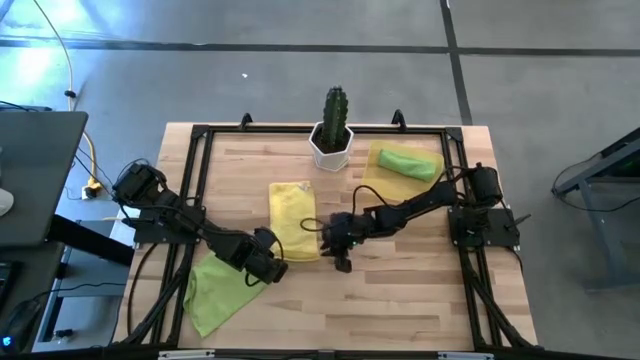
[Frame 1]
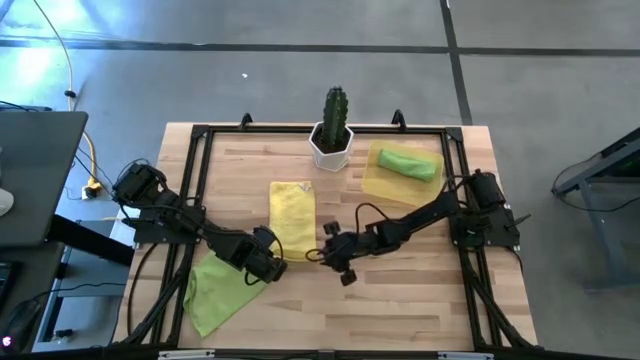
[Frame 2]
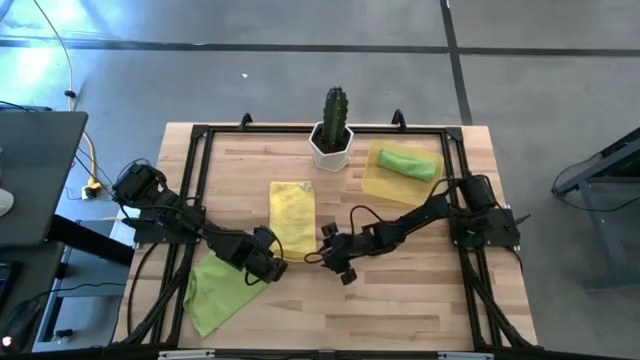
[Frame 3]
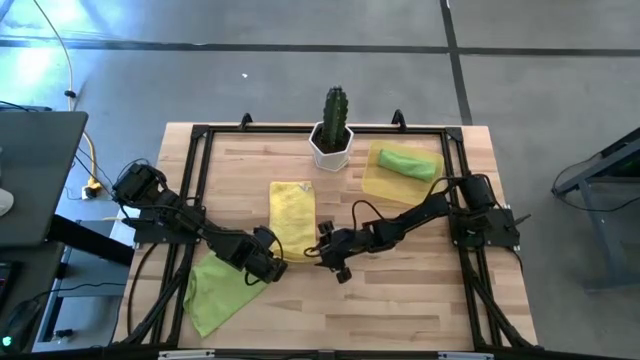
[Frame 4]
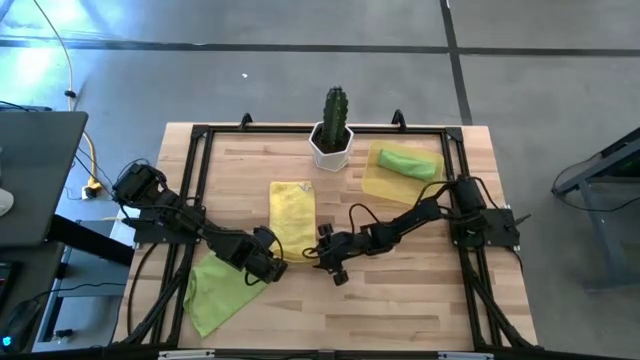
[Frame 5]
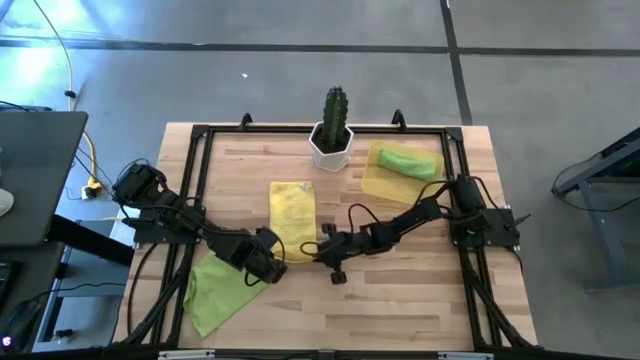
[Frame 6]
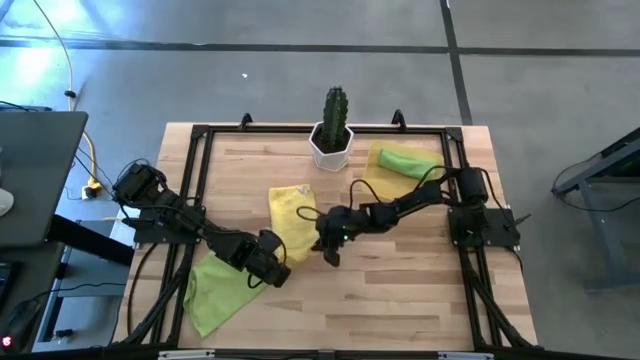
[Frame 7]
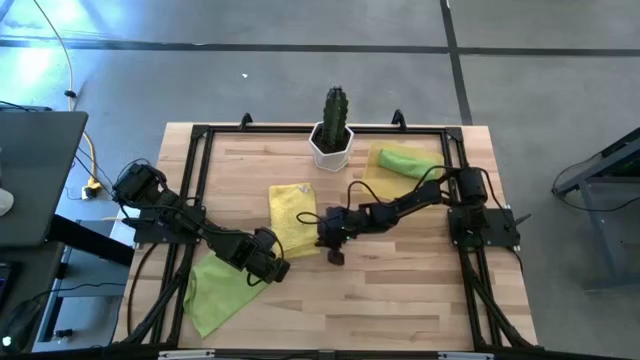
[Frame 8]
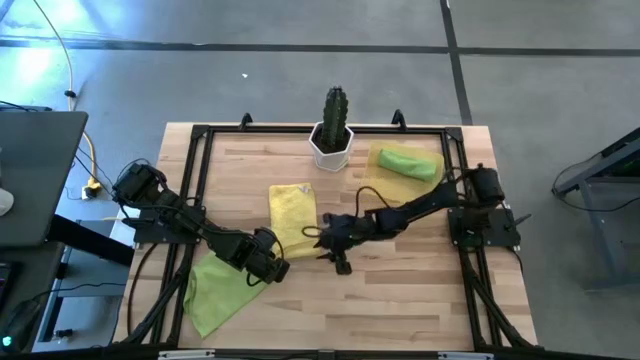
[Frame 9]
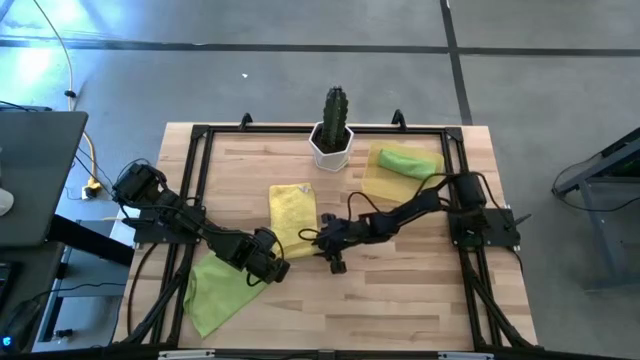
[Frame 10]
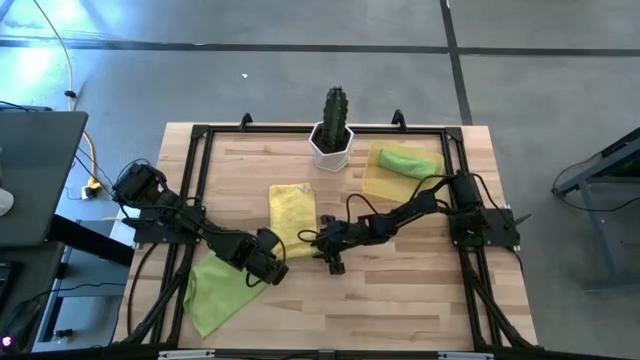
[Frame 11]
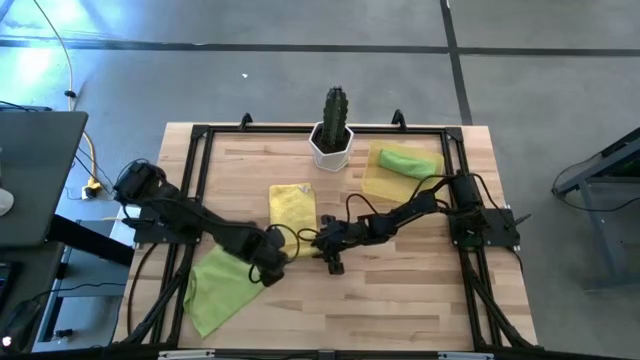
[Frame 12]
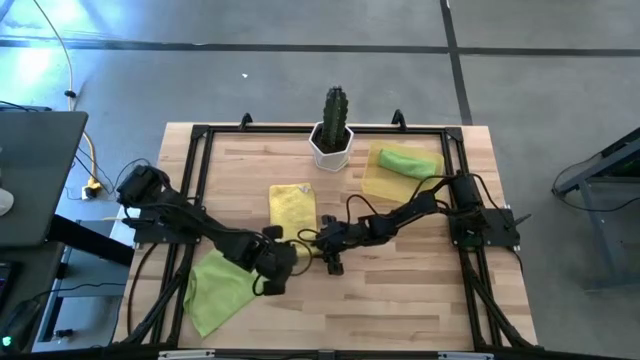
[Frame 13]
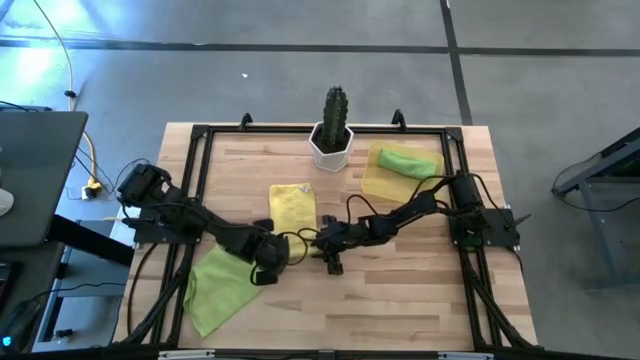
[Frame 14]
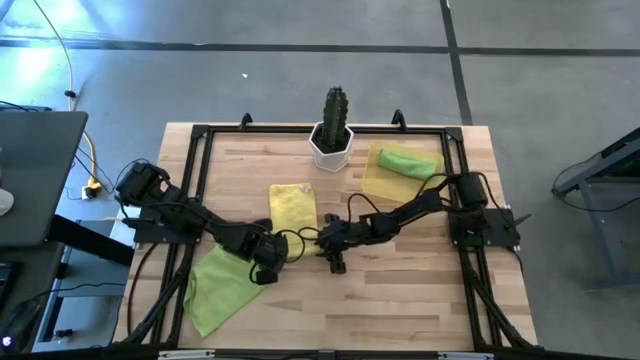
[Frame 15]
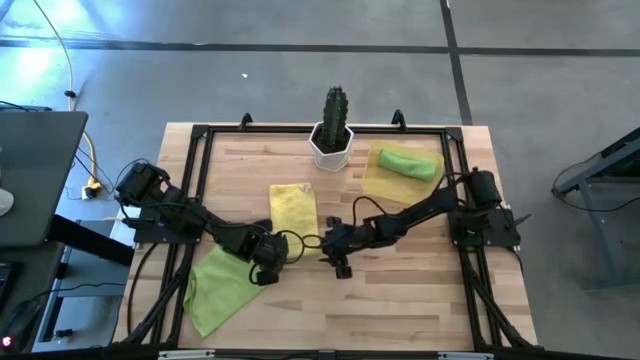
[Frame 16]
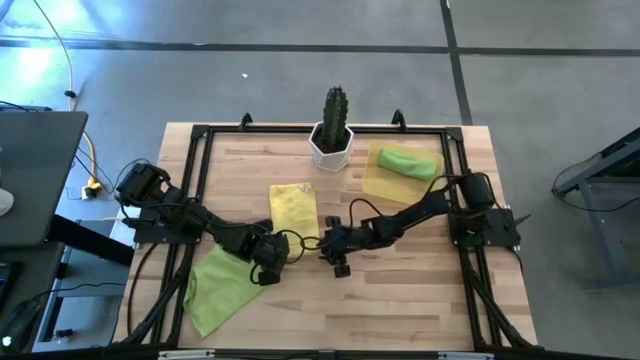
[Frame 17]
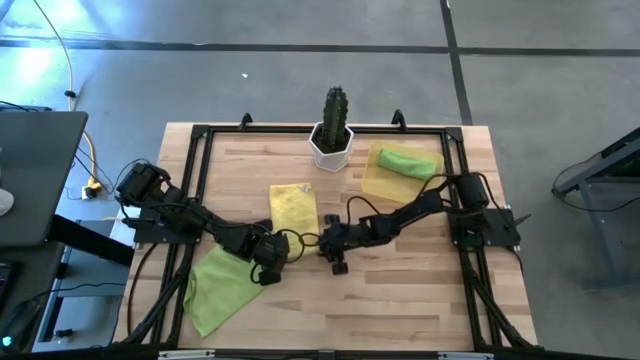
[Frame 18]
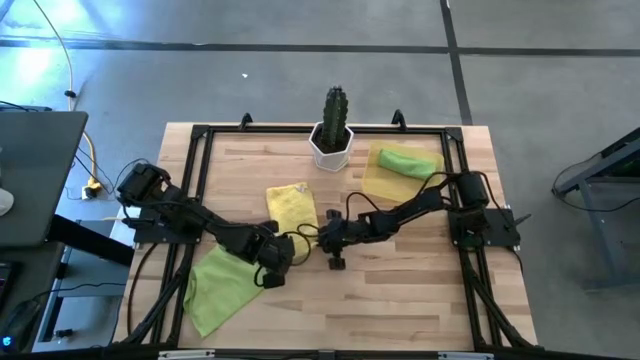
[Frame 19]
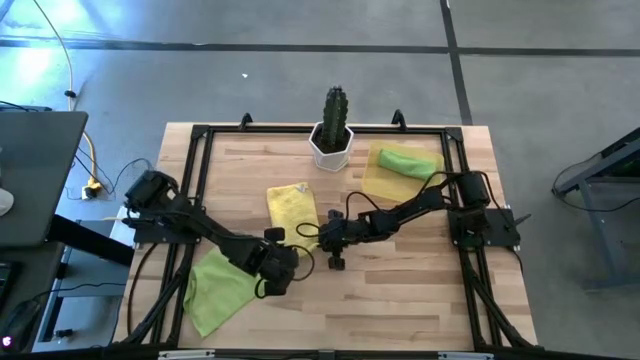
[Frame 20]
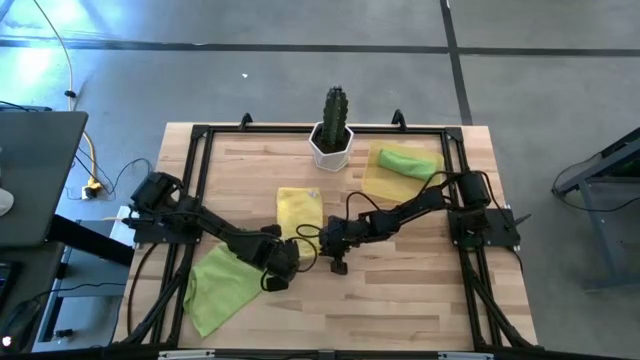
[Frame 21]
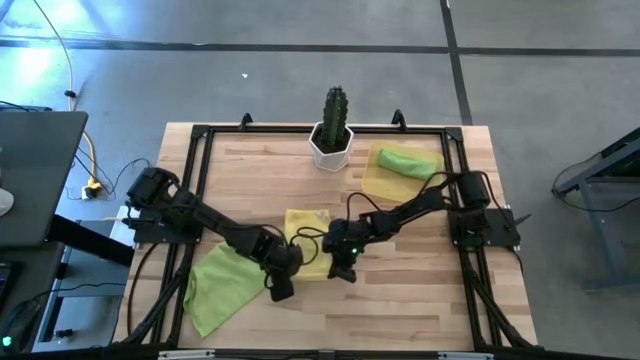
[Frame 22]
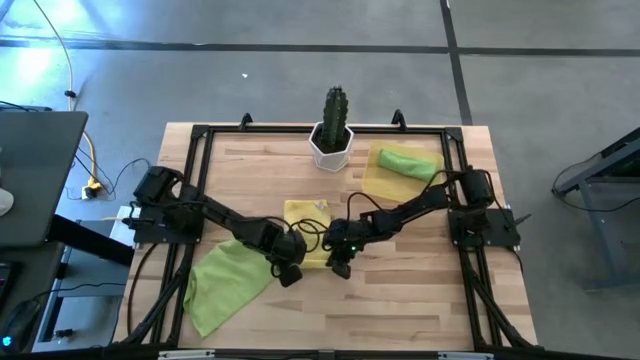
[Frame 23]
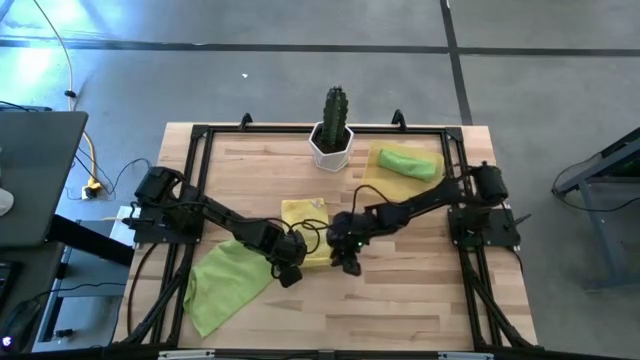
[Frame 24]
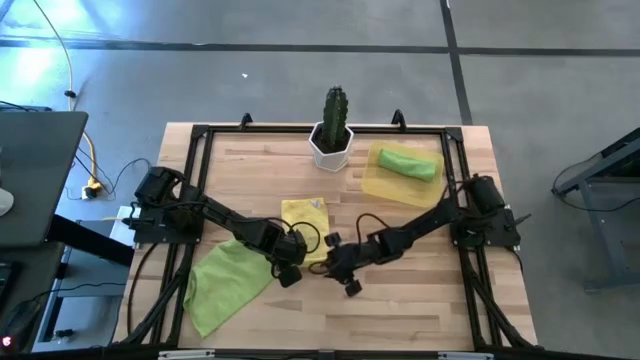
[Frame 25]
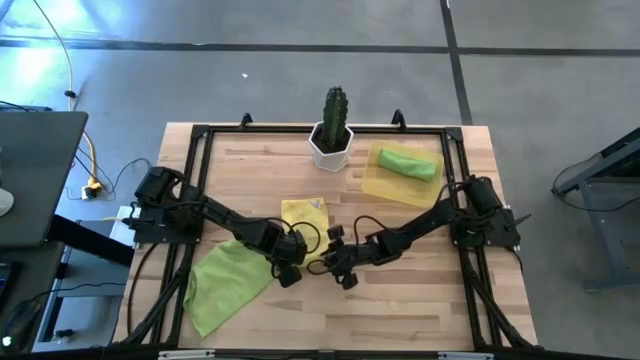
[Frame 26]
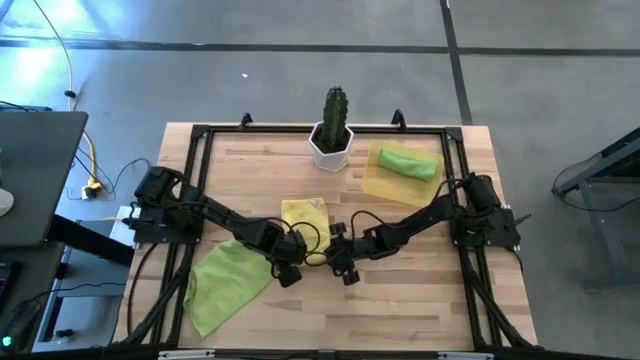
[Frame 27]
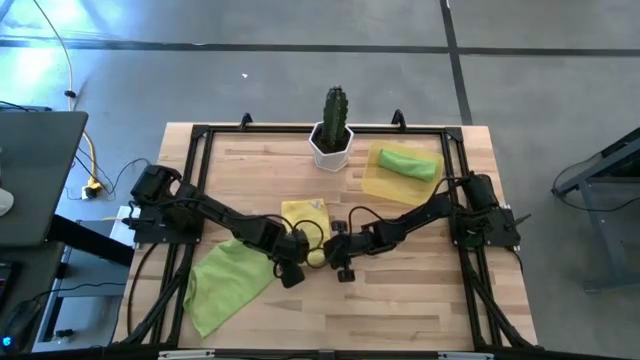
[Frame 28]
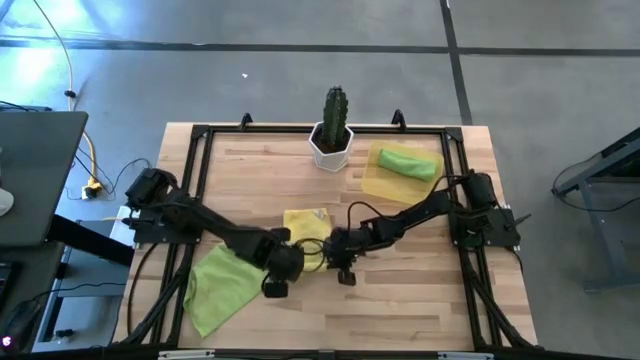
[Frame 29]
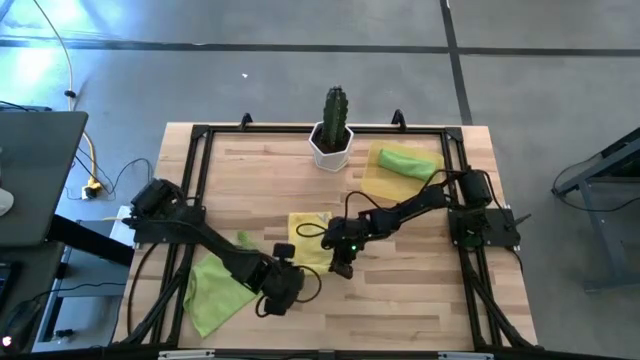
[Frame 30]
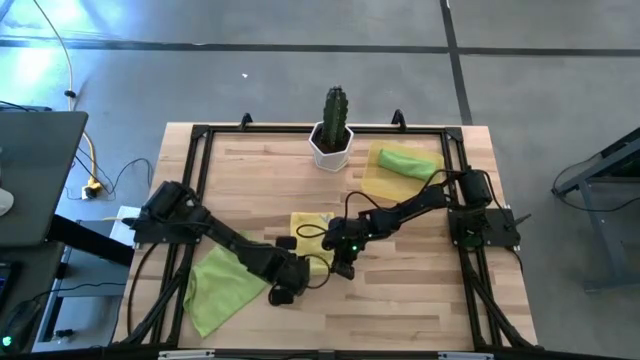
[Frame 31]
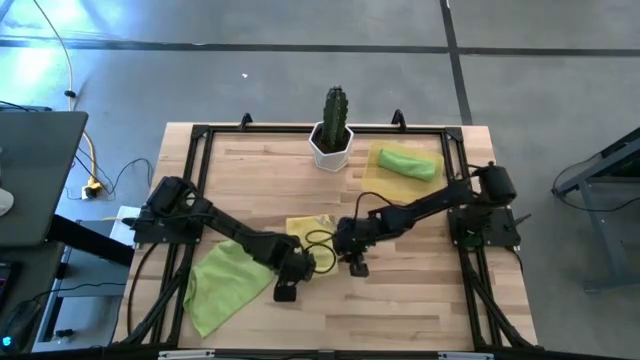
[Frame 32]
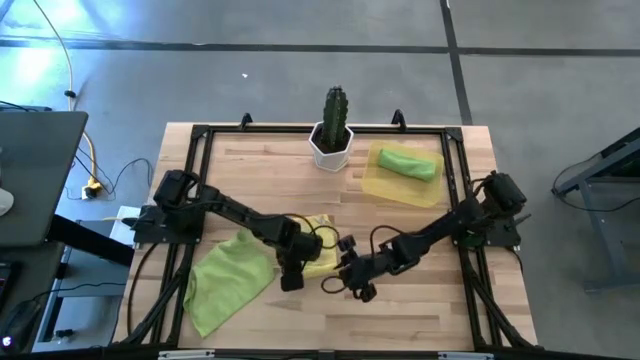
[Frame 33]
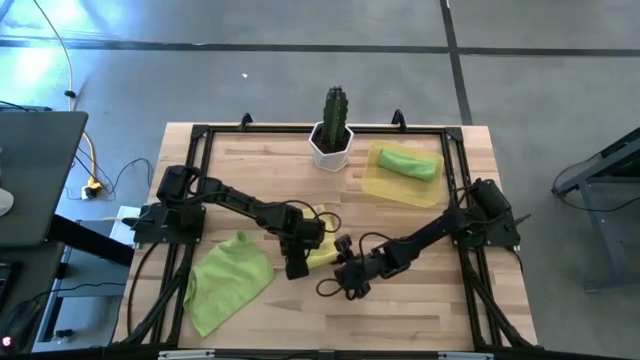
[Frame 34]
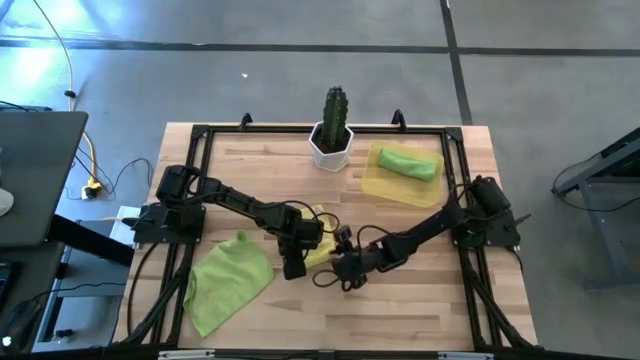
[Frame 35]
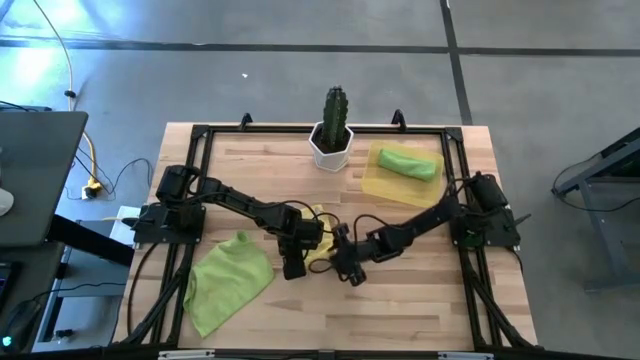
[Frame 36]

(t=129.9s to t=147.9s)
Task: Roll microfiber towels into tight, uniform cylinder then place into a basket
Roll the yellow towel

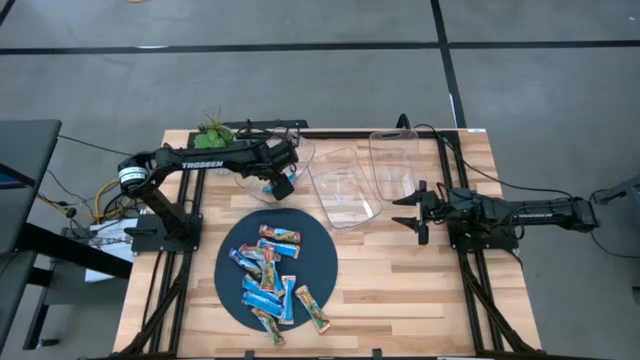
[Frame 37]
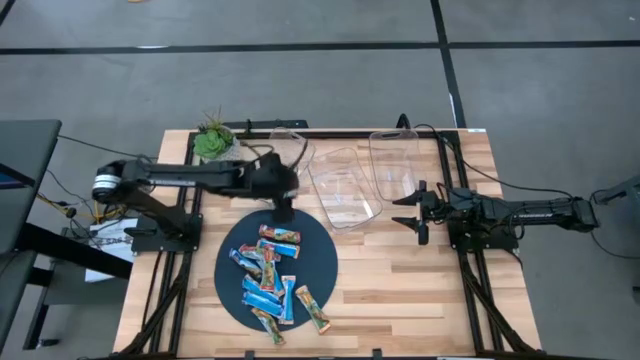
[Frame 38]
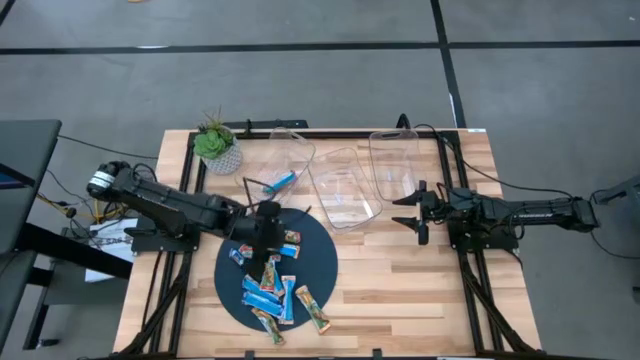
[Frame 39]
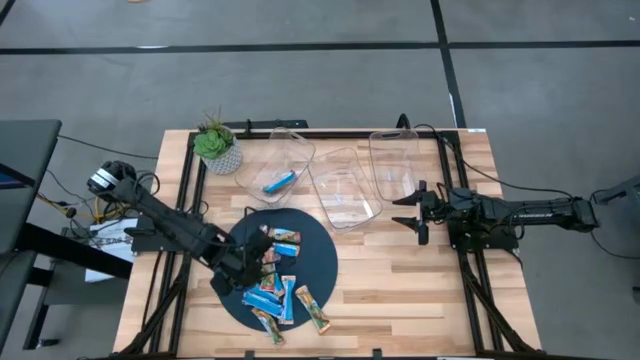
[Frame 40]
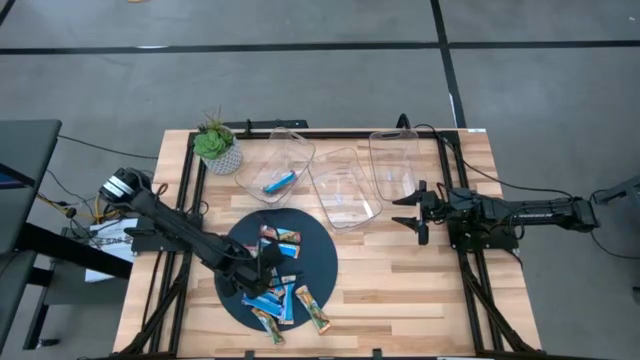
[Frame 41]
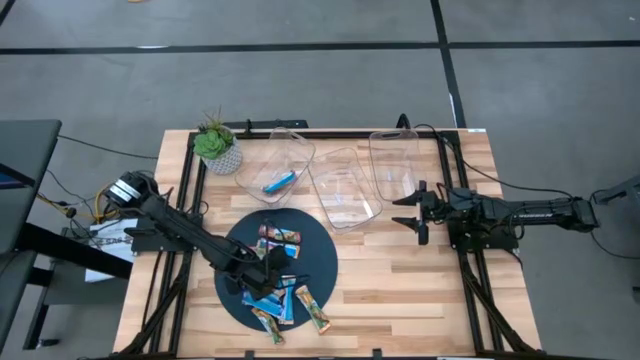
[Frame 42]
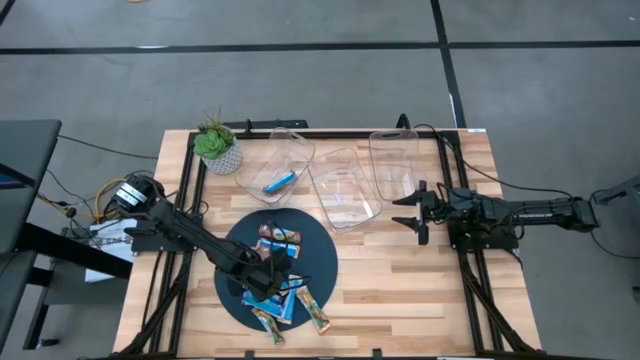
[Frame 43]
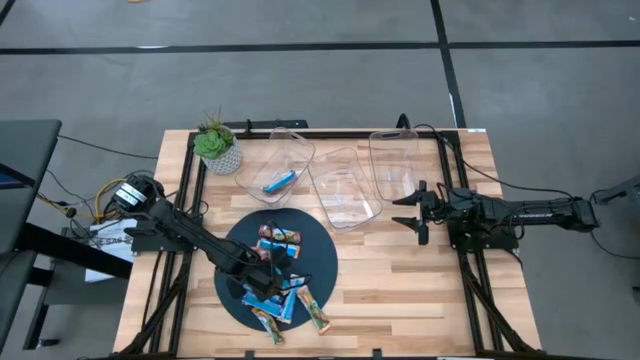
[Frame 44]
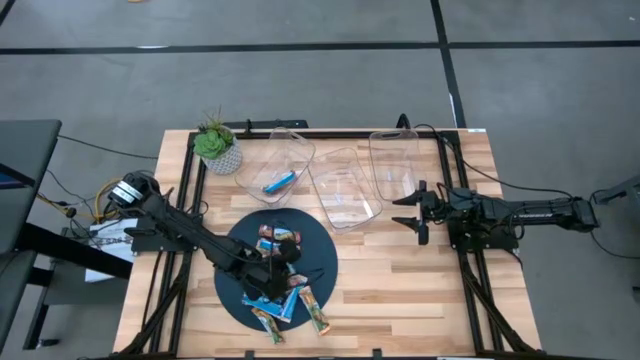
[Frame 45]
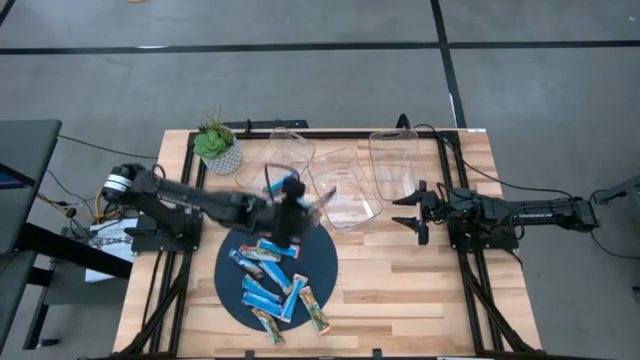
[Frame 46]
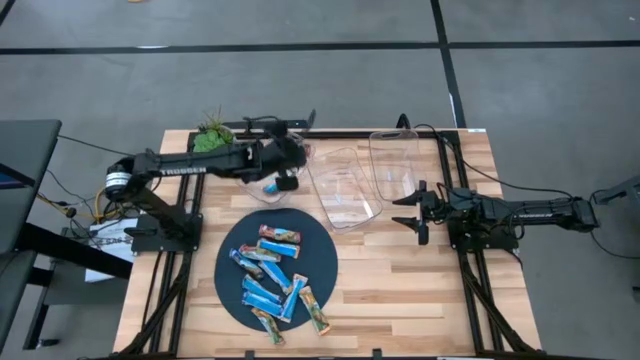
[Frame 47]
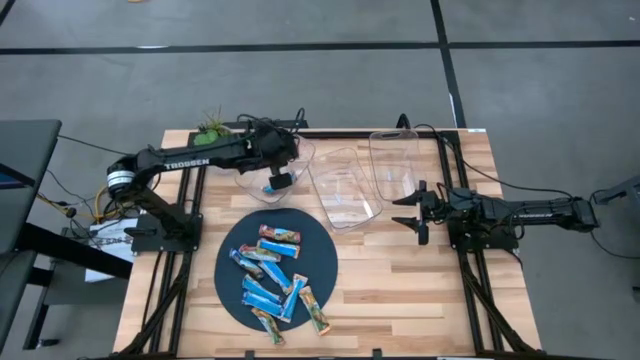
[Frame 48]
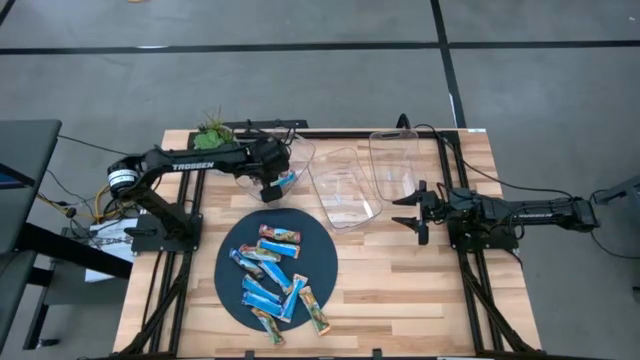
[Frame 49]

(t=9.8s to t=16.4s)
Task: Pick and place Granola Bars by type
Put the red granola bar into the left transparent bin
